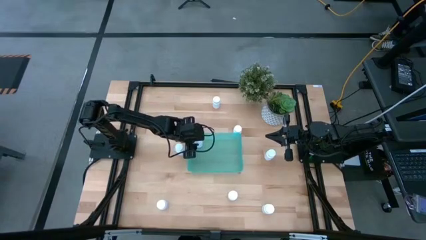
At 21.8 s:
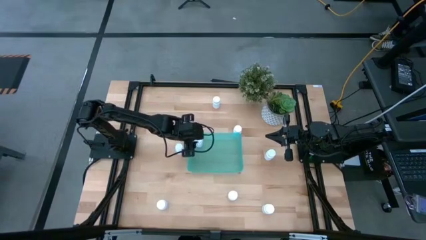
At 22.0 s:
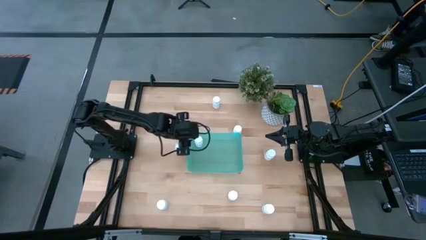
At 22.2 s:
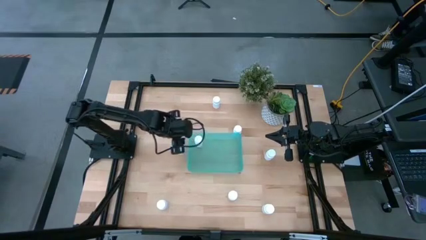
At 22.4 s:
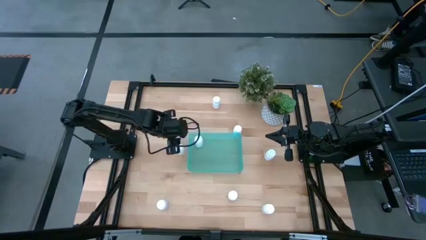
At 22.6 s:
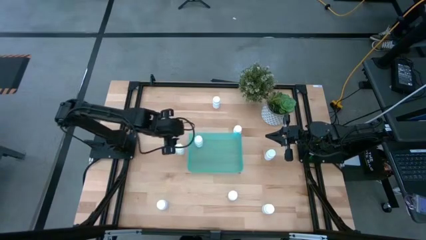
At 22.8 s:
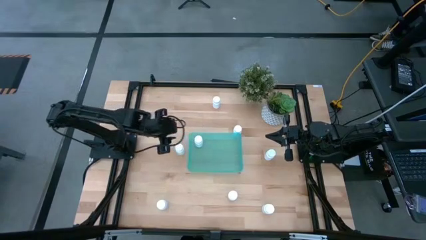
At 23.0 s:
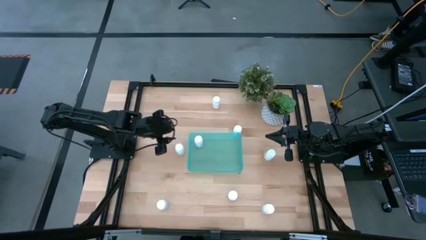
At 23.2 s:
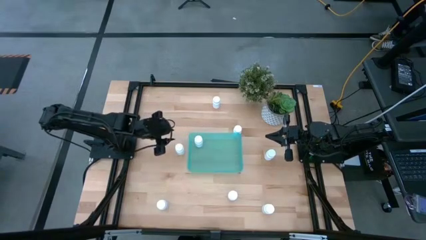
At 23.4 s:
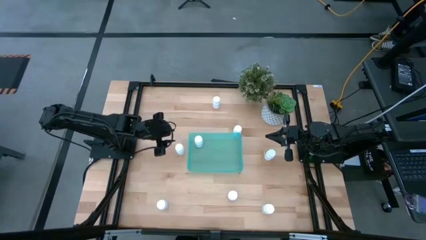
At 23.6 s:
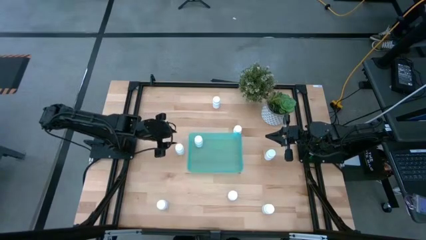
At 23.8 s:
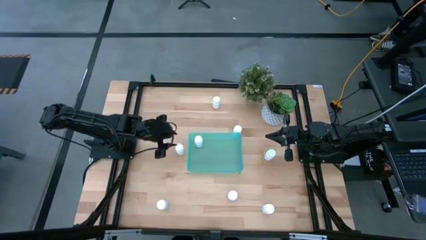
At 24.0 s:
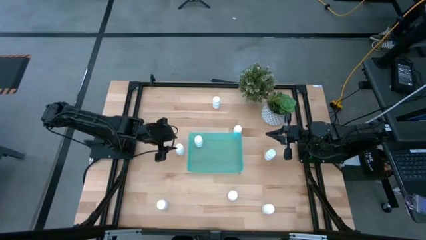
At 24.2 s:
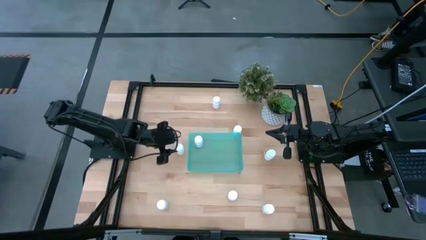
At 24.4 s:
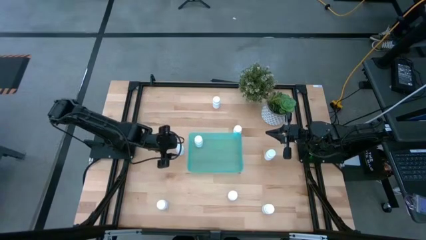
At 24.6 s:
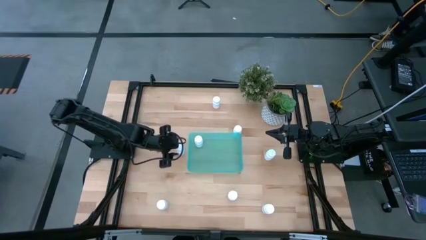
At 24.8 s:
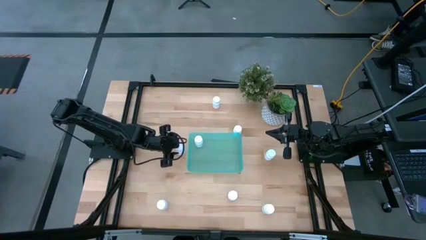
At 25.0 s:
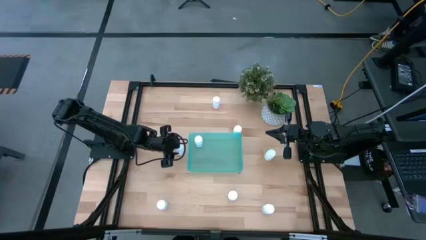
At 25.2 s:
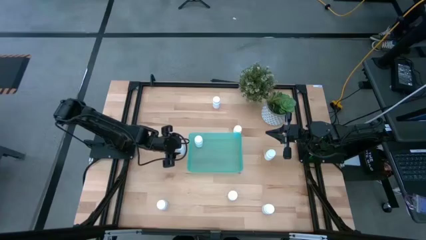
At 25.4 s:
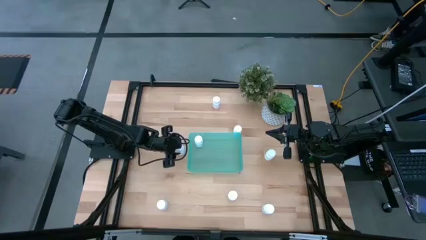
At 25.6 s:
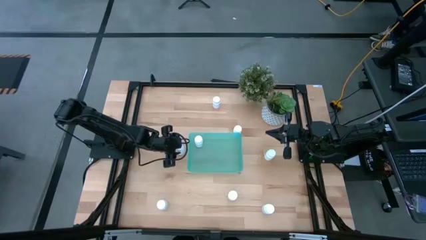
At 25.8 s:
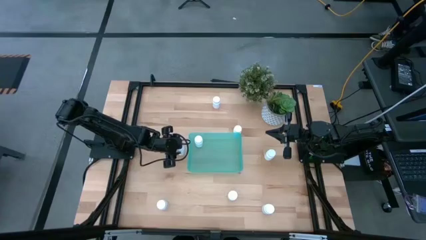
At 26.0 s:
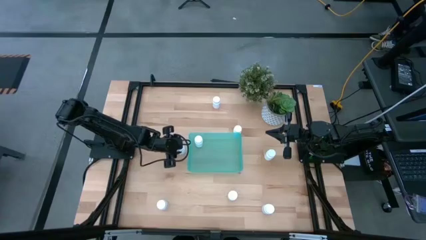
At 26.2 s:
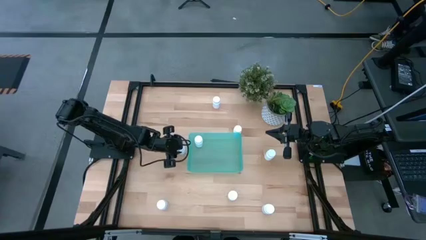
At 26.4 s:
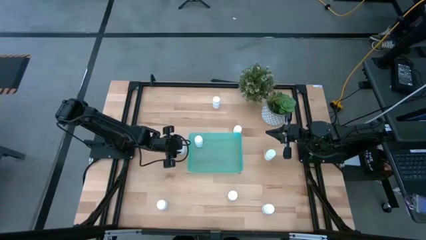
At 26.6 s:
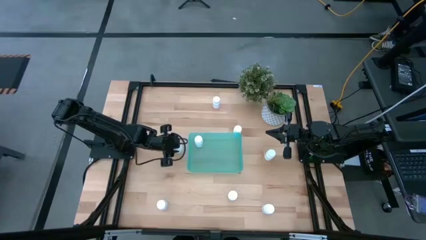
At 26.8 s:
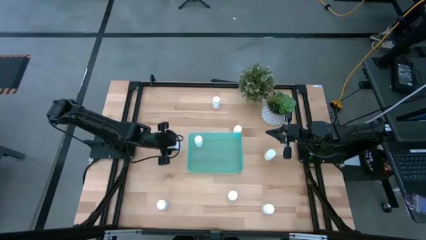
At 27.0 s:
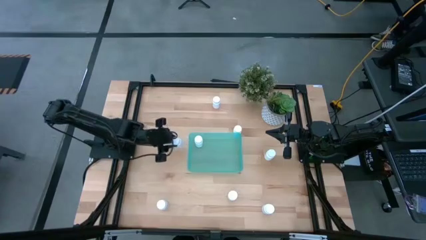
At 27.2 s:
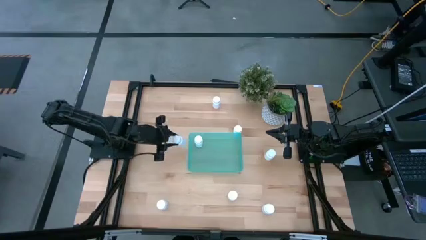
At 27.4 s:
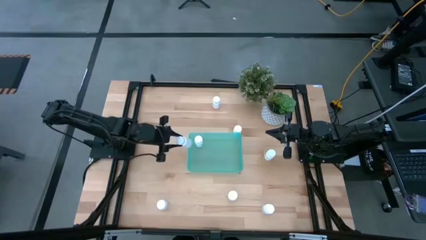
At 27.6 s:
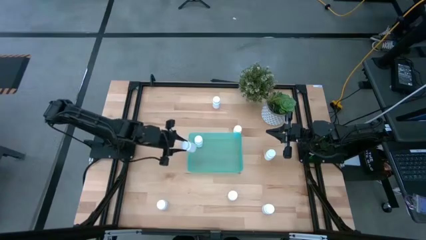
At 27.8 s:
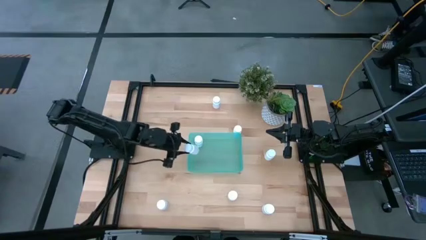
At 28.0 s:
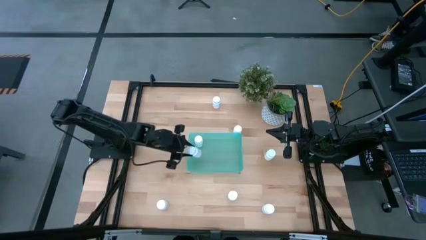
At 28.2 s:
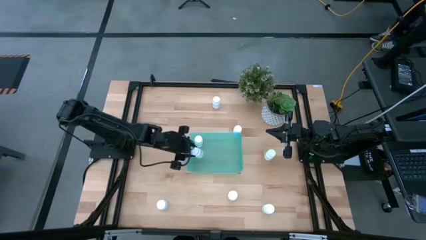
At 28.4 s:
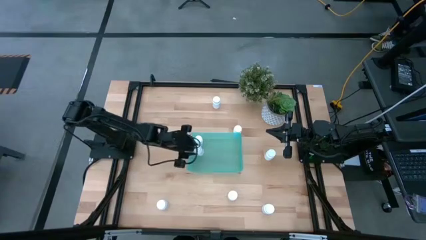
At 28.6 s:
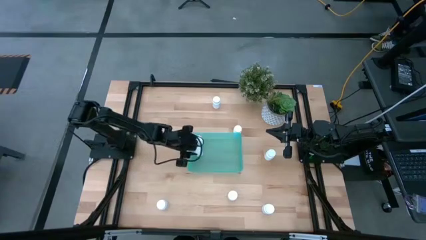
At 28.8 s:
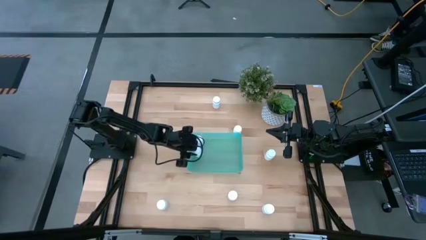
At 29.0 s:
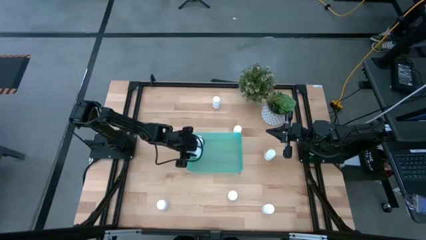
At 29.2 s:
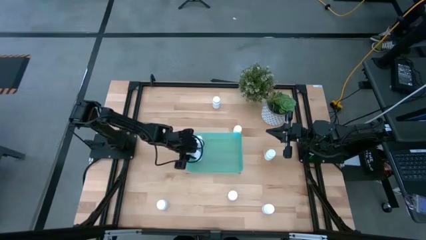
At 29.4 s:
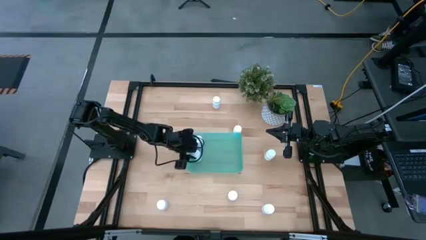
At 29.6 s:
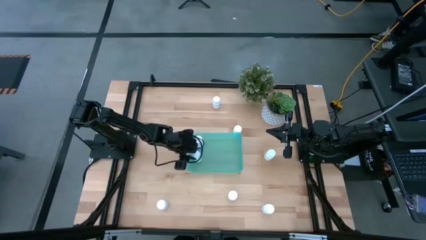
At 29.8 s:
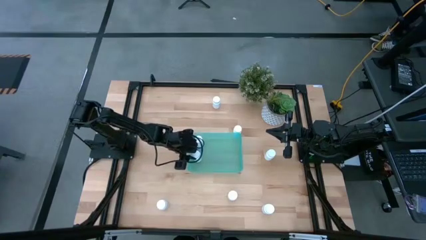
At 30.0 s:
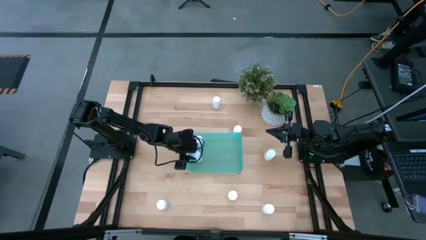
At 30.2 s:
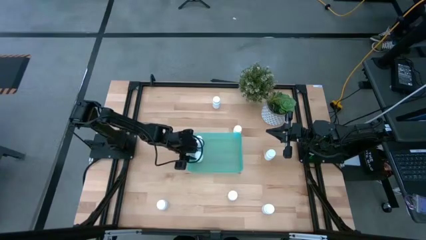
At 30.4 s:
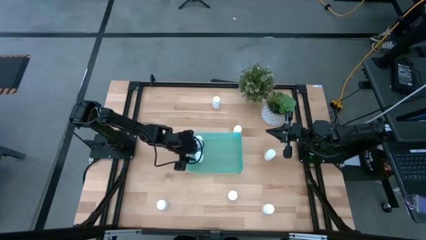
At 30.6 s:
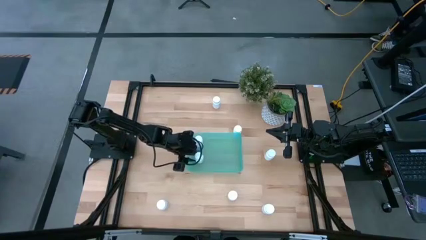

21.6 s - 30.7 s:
Task: Pick and place pill bottles into a basket
Put the white pill bottle into the blue bin

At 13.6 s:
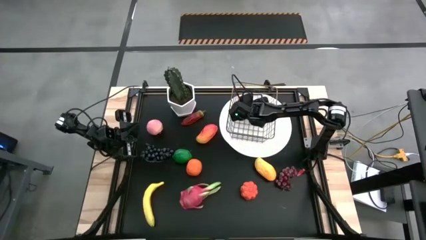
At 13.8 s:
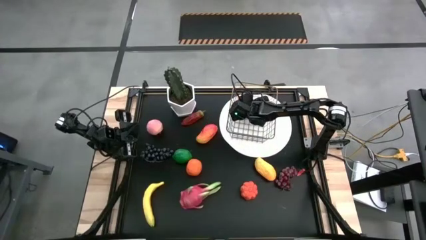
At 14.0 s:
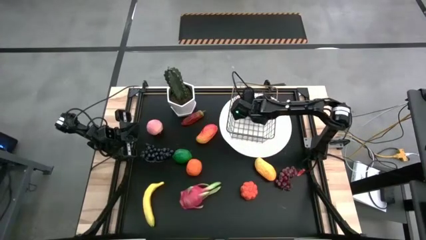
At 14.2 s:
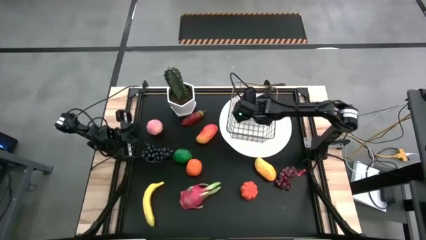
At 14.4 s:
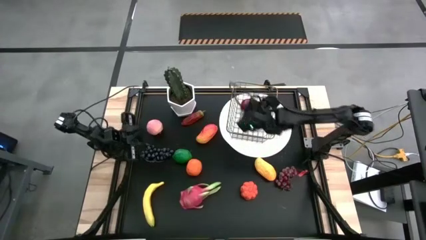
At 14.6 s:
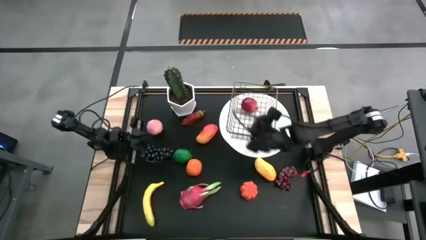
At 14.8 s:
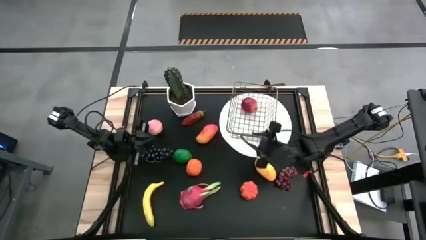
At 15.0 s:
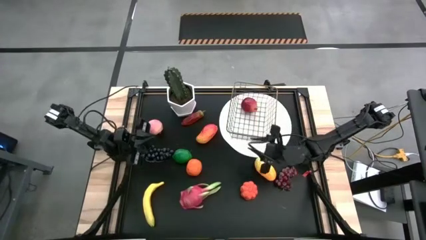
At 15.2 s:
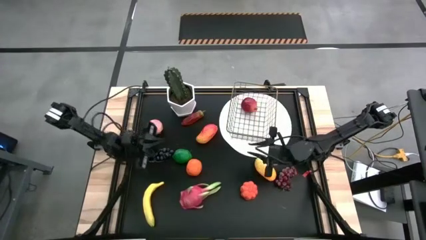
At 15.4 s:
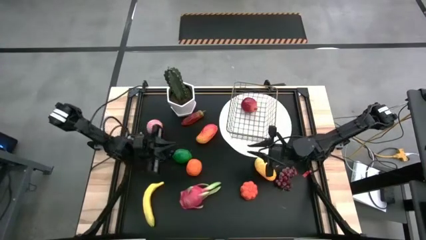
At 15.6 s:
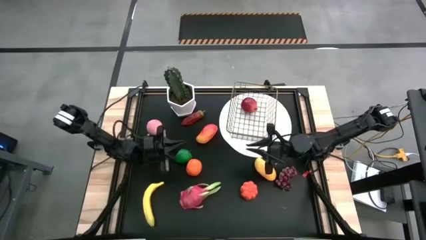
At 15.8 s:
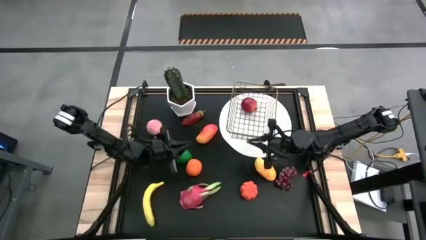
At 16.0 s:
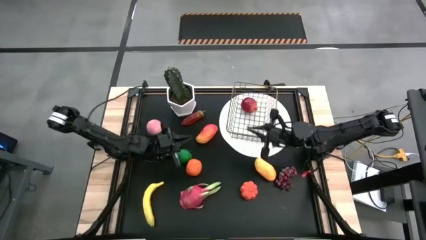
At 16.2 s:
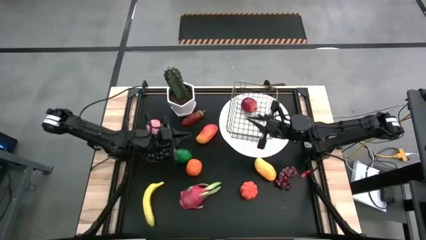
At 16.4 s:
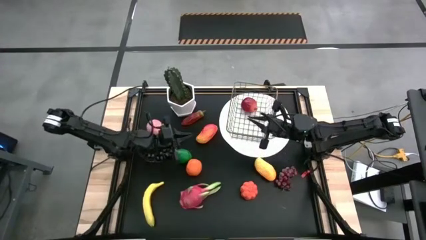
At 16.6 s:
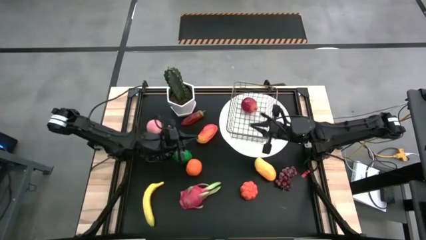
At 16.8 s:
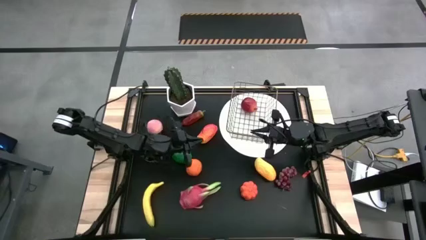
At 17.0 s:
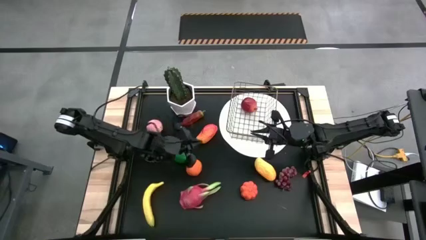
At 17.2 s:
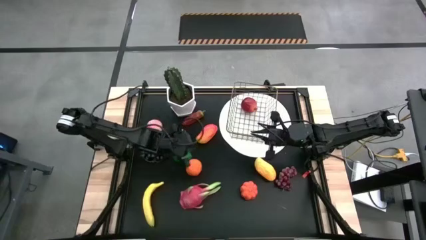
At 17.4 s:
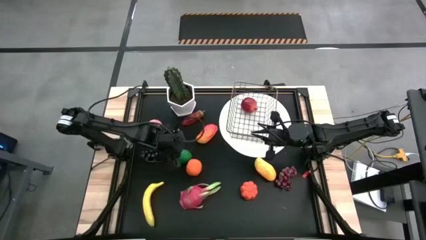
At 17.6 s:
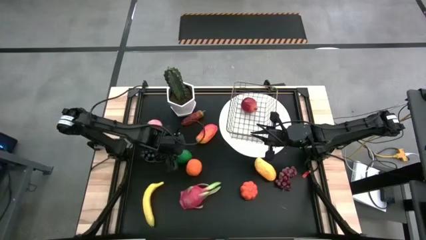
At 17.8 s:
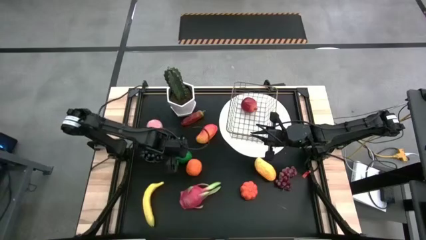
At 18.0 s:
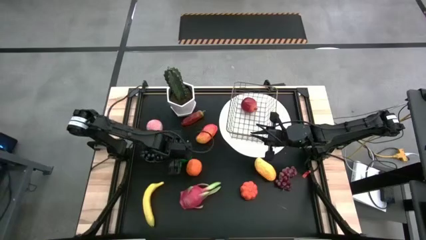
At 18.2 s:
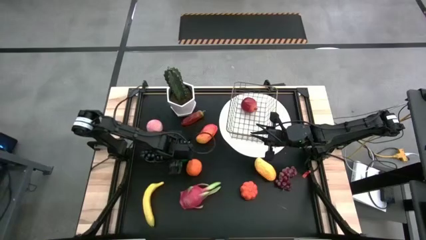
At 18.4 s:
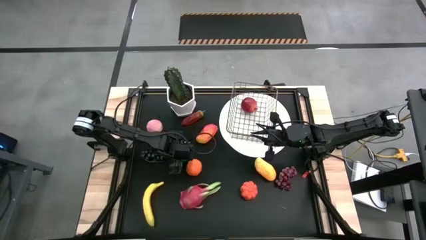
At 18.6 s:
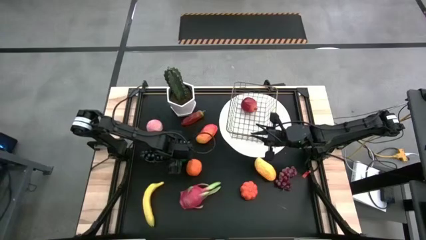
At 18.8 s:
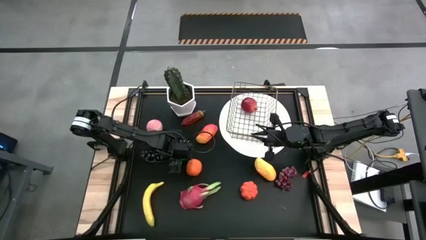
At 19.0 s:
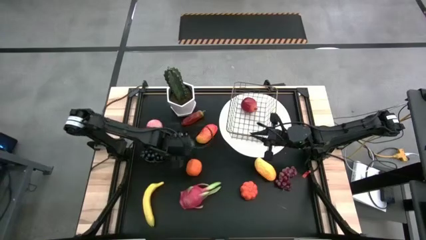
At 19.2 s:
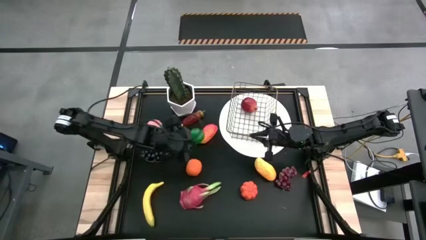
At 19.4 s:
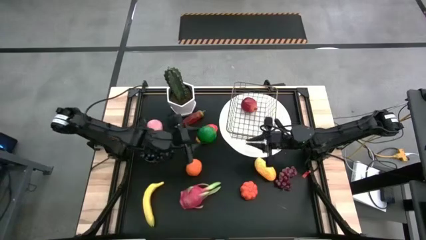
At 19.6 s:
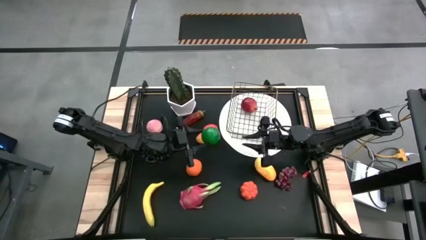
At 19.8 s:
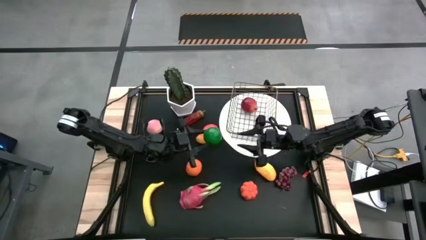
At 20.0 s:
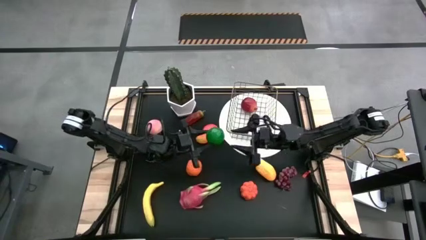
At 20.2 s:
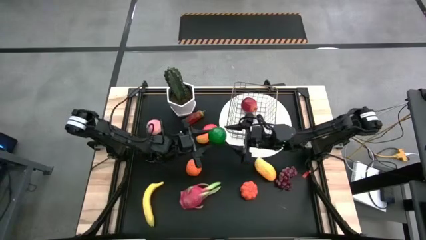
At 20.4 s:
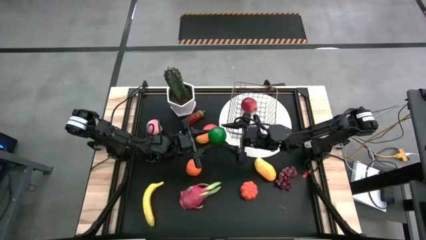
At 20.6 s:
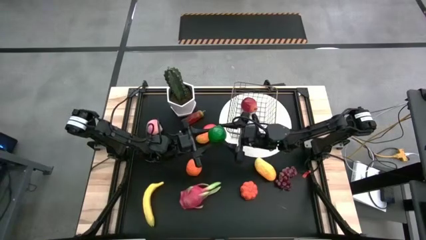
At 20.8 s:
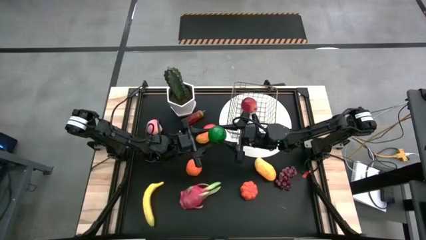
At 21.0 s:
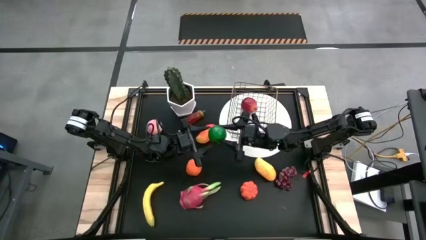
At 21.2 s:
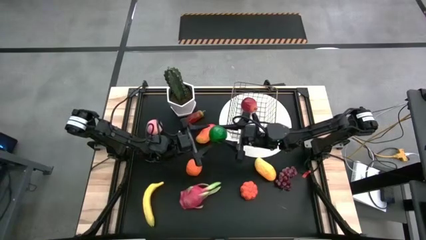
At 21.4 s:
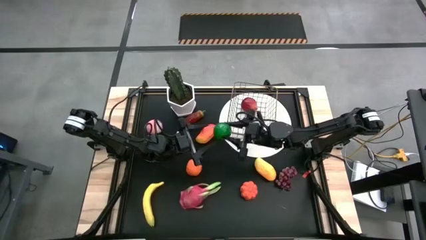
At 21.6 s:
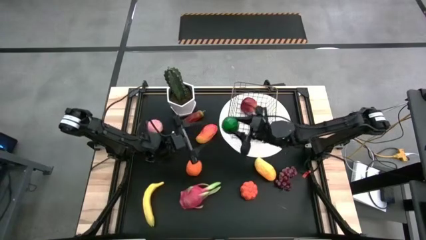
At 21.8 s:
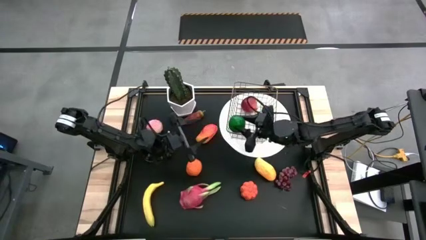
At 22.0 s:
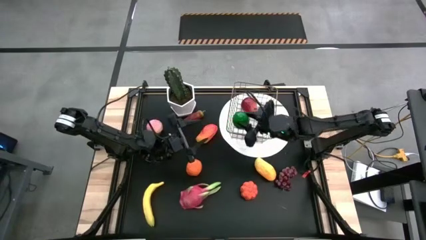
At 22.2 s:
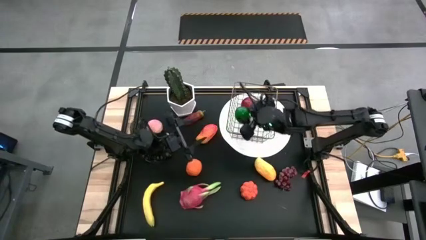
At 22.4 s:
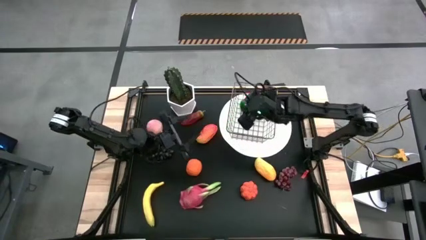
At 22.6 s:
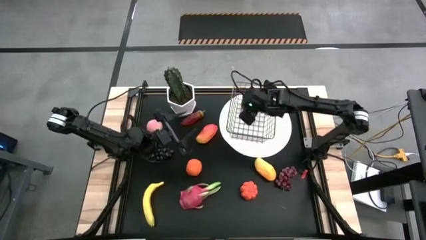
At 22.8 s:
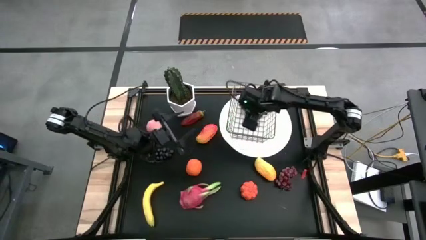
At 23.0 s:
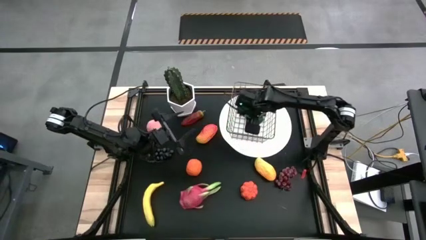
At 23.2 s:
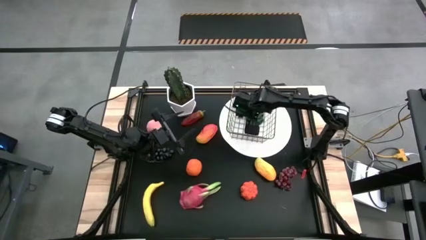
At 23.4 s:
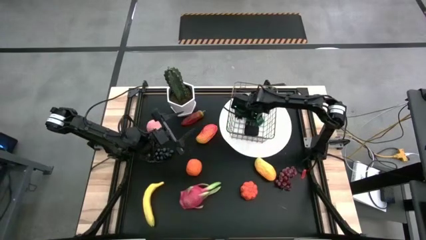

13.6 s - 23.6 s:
Task: Build produce basket
Put the lime into the wire basket
